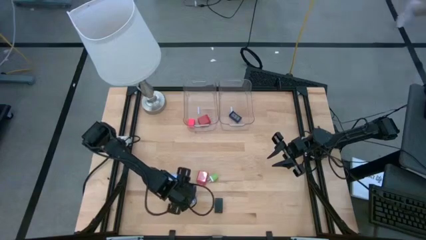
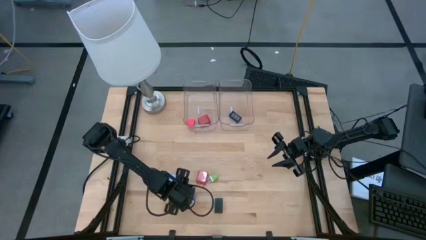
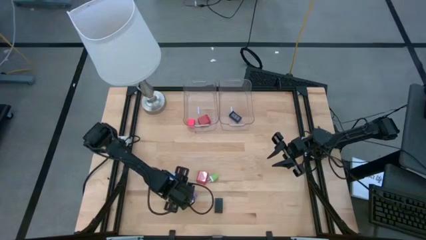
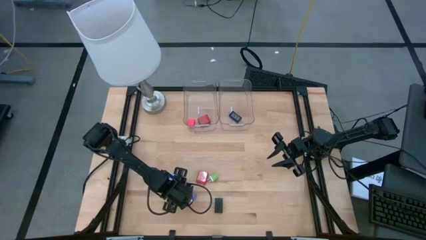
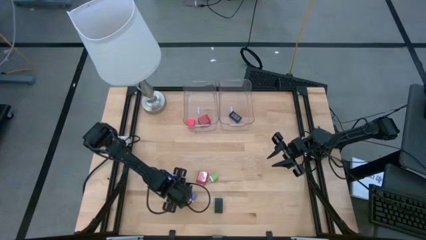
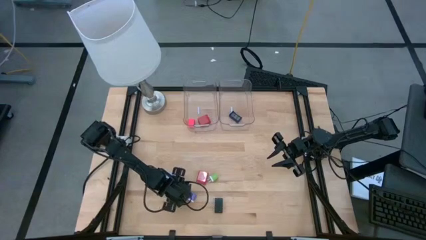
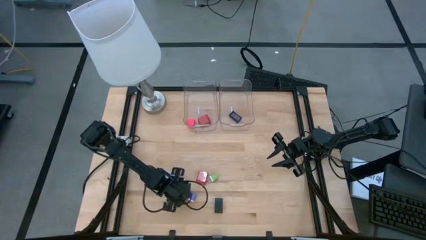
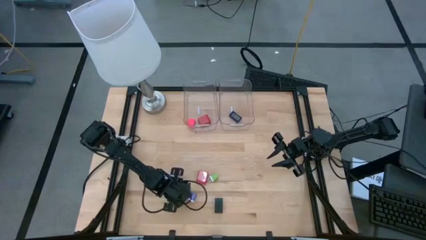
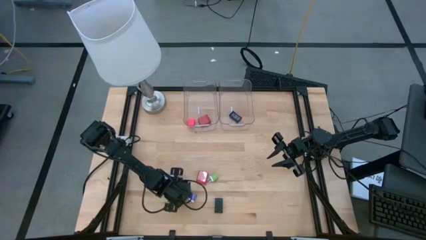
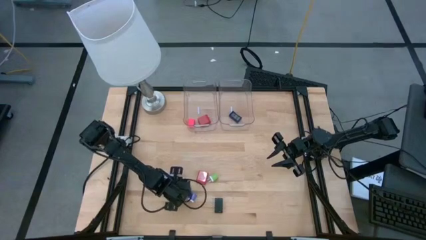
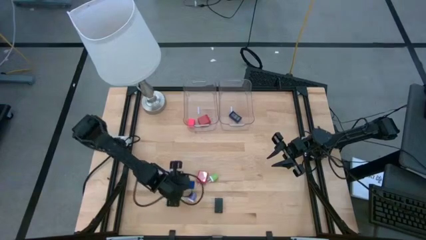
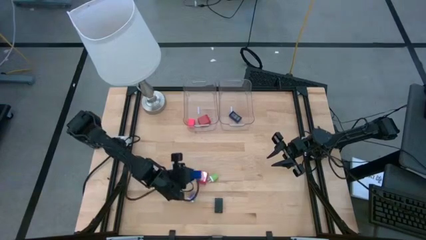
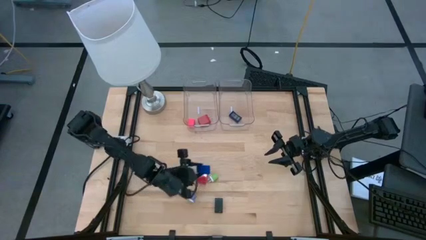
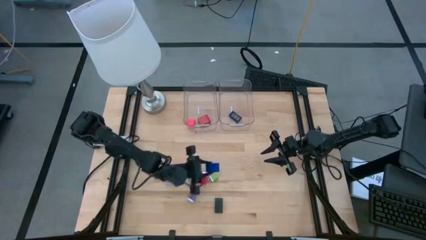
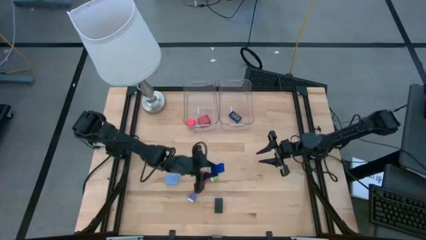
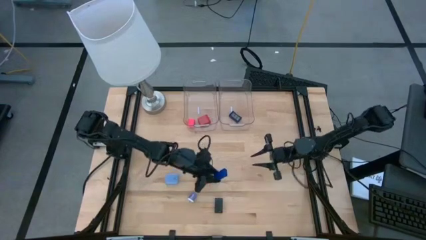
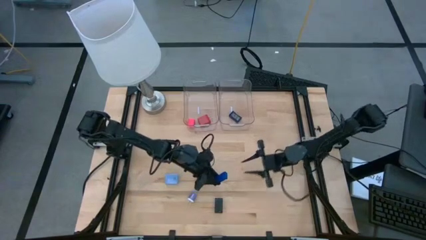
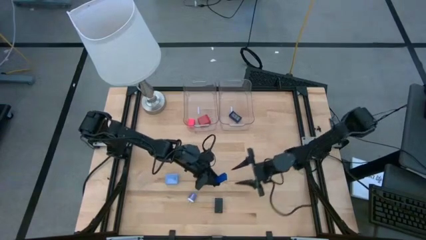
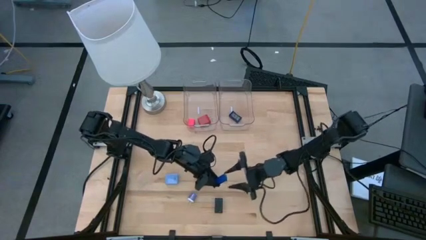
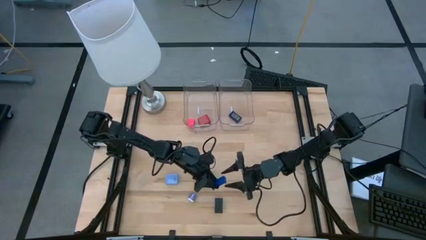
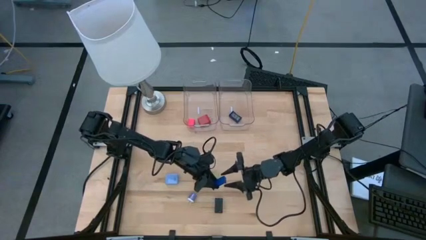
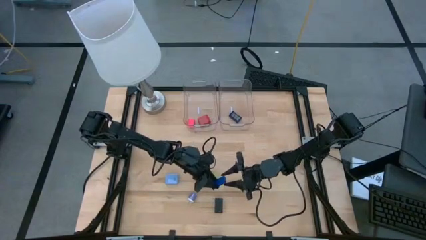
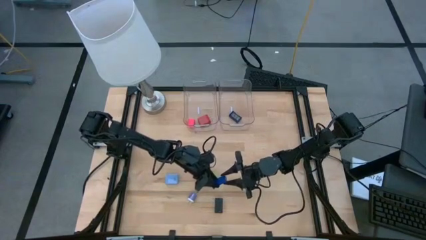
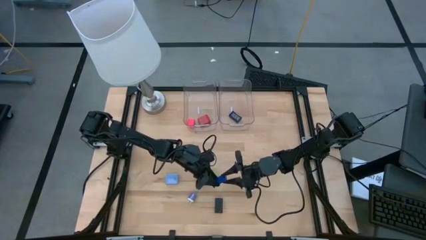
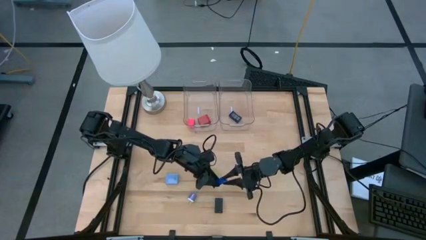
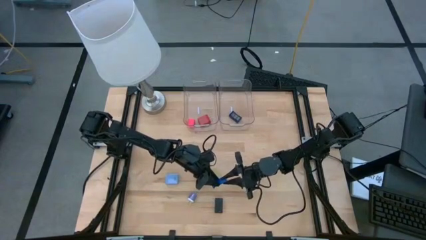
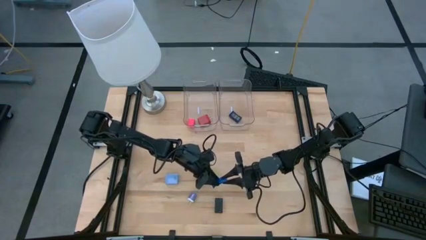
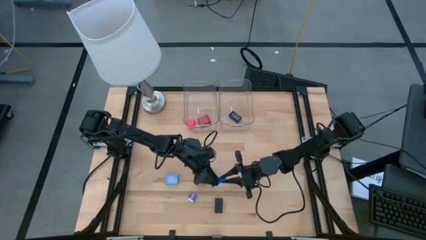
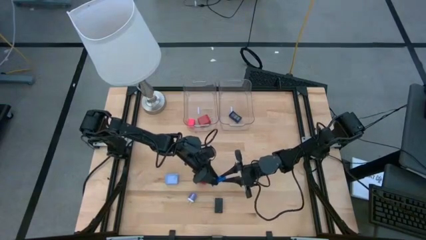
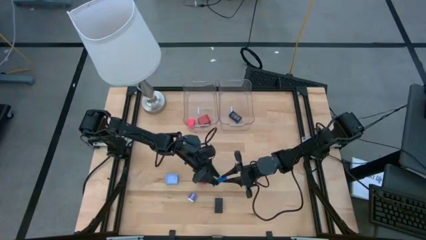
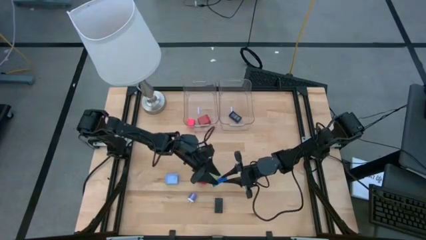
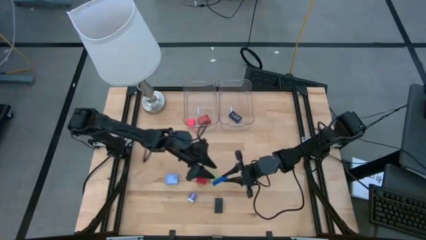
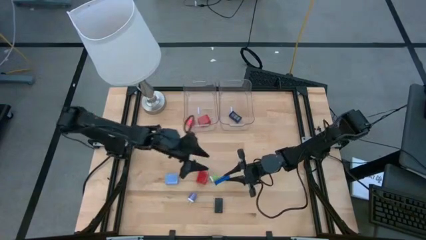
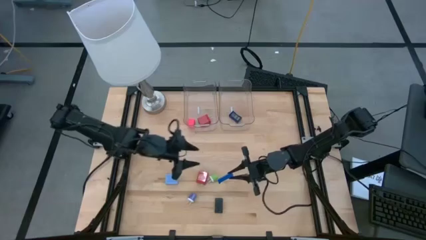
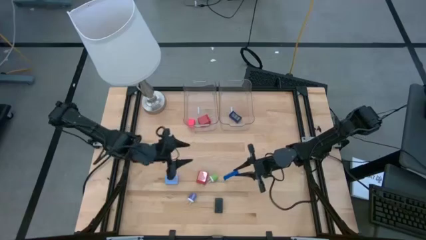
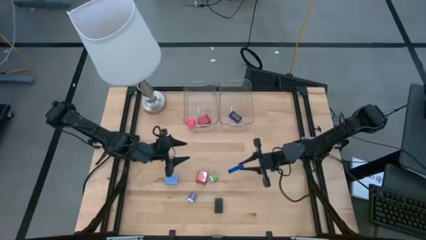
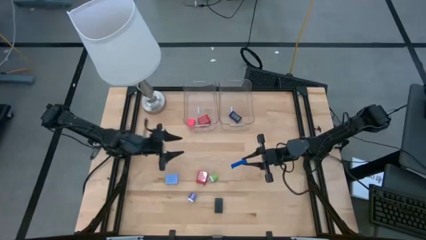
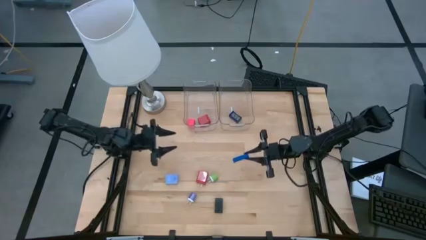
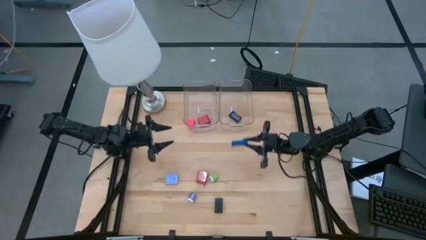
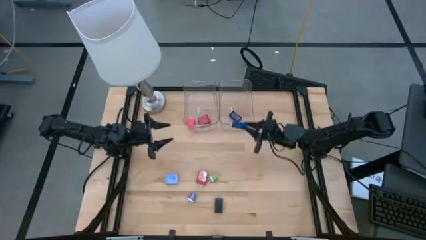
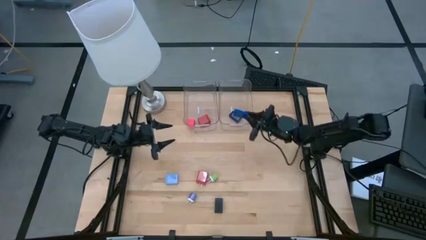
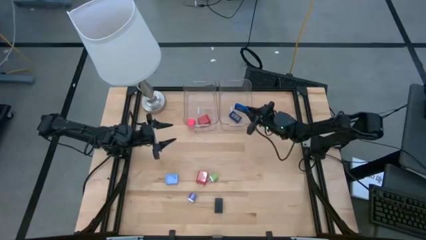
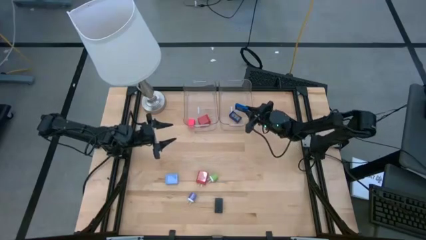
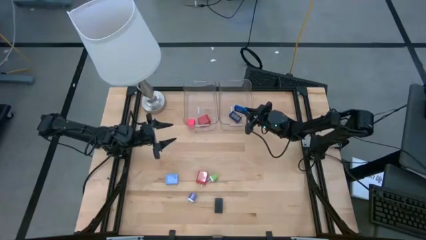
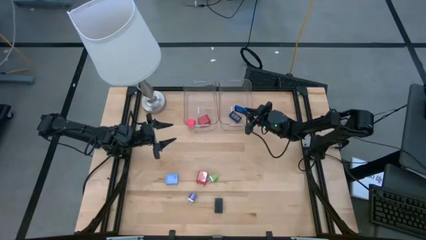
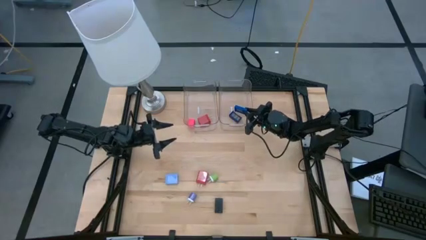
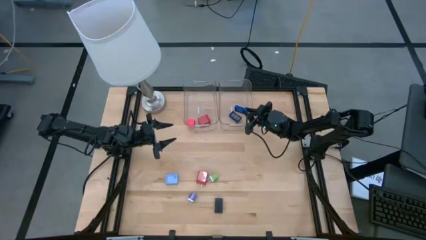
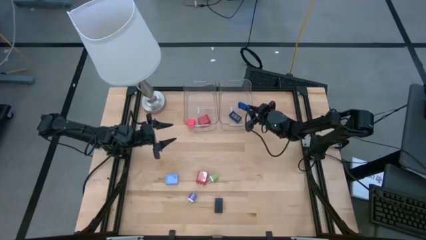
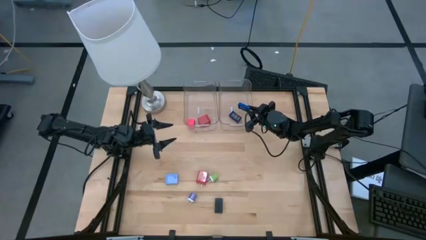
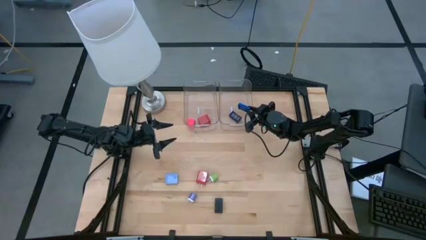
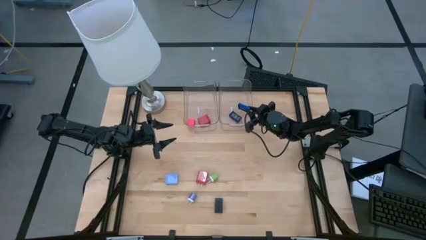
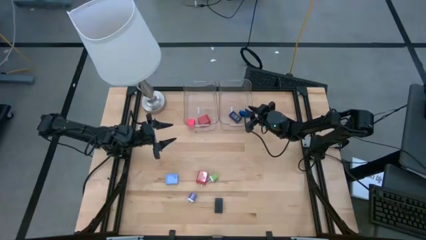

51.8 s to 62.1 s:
Task: Pick & Place Office items
Put the blue timer into the right transparent bin
